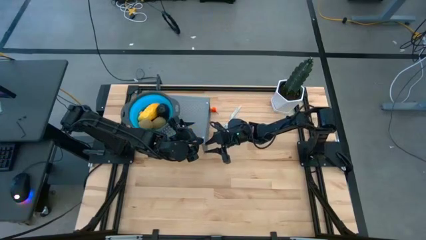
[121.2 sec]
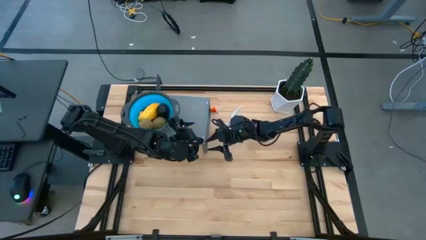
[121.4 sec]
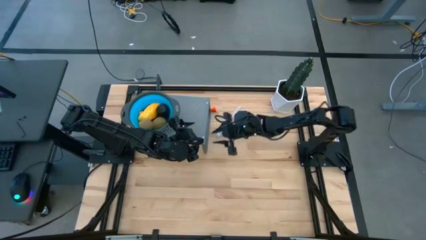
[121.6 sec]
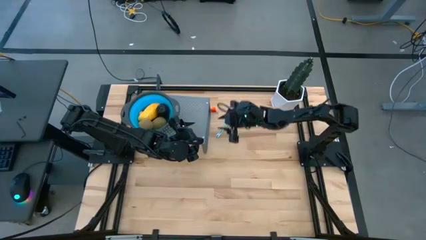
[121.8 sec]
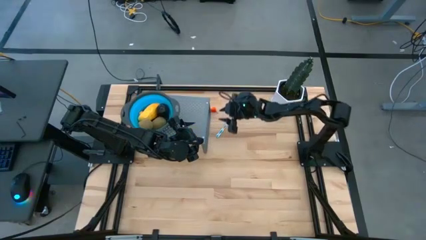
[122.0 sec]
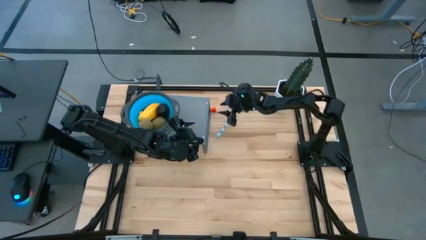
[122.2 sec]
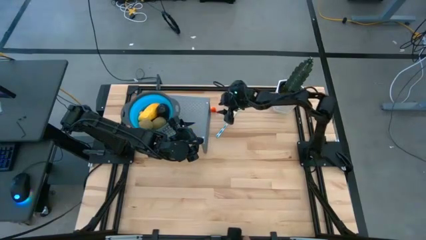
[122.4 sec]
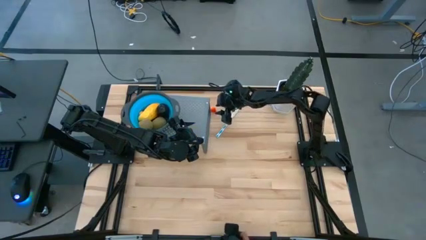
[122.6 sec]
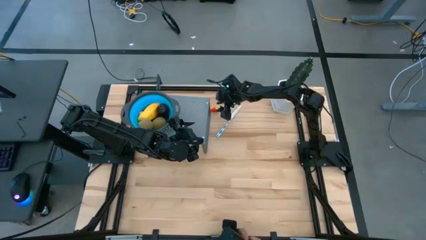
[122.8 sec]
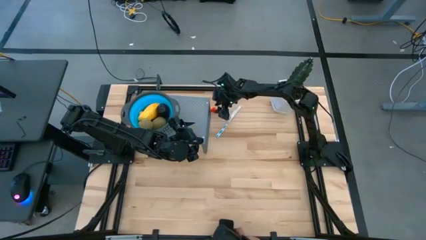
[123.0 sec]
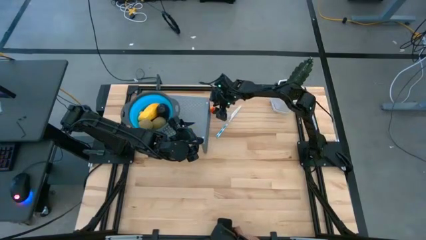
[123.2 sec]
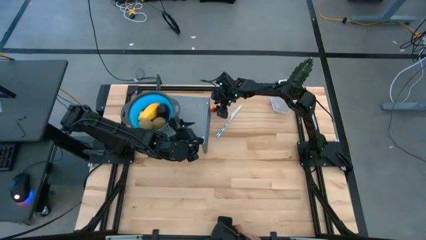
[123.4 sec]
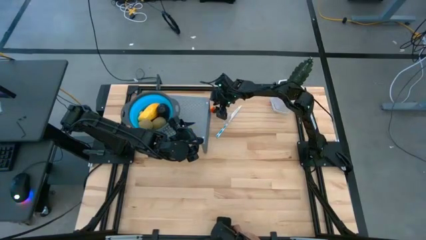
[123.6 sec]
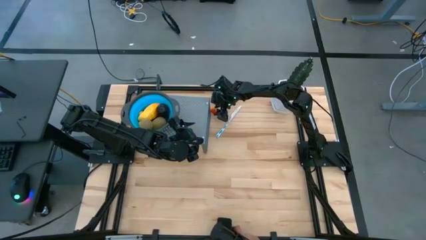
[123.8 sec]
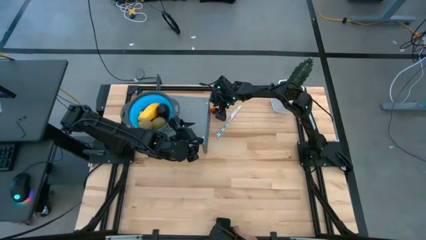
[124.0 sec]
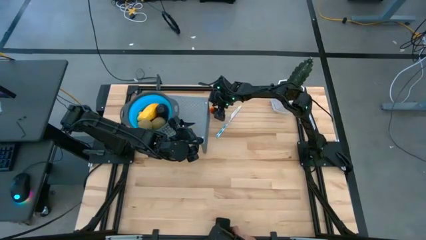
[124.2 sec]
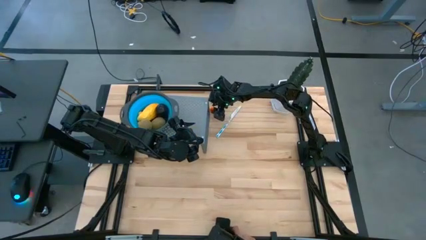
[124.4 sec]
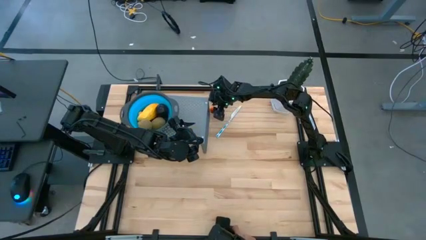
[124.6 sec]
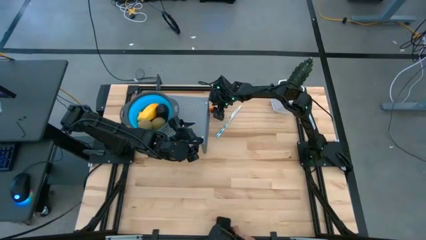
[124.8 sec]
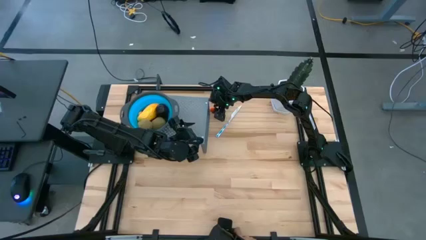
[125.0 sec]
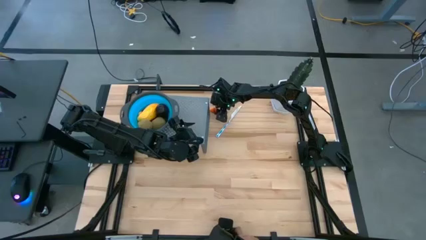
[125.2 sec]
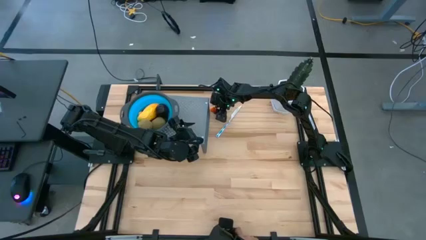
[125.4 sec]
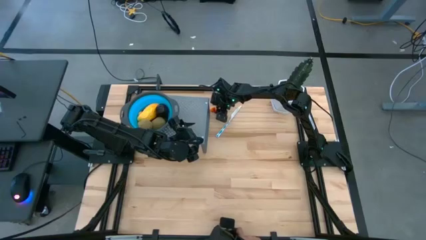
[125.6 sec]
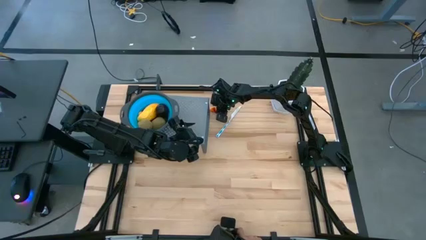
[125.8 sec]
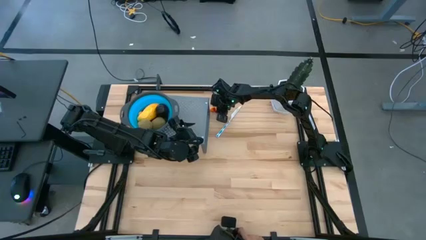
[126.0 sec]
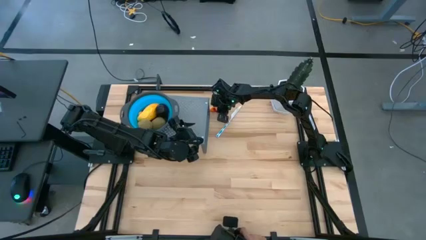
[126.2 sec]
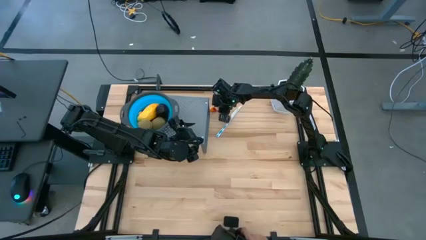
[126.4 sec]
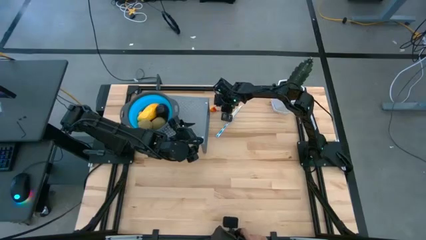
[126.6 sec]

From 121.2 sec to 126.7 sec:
Task: Pick & Place Fruit
Put the orange pear into the blue strainer bowl

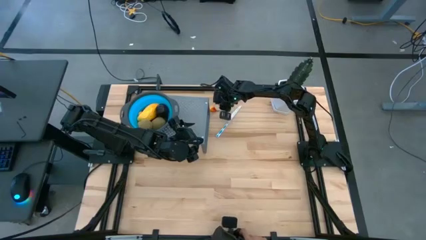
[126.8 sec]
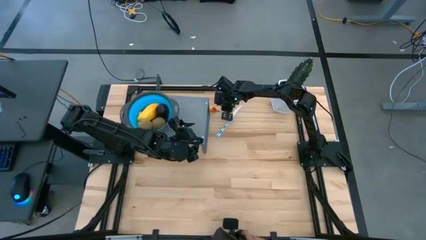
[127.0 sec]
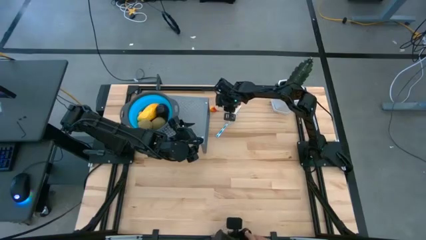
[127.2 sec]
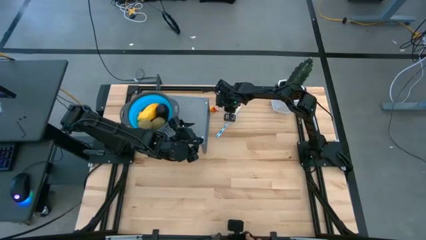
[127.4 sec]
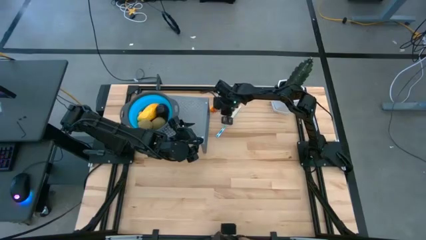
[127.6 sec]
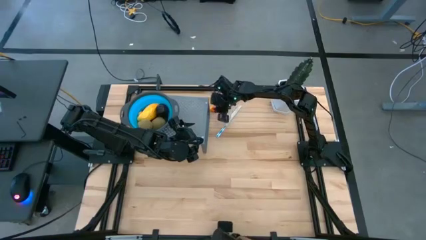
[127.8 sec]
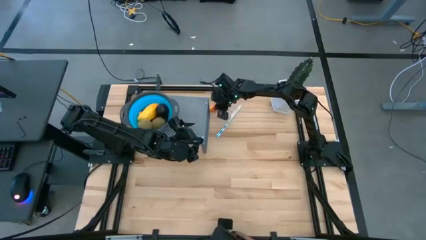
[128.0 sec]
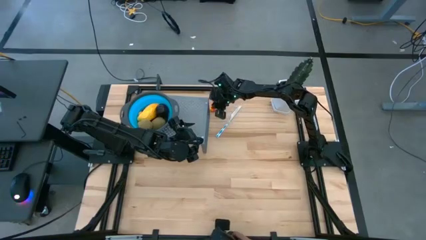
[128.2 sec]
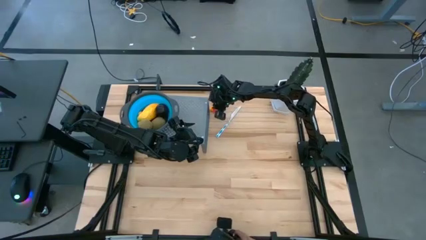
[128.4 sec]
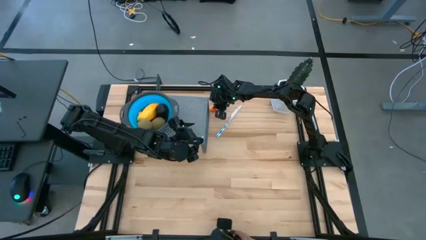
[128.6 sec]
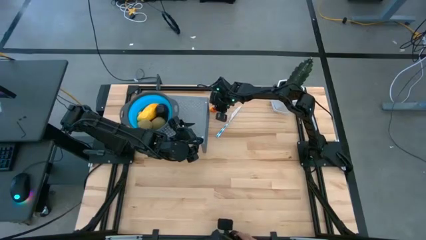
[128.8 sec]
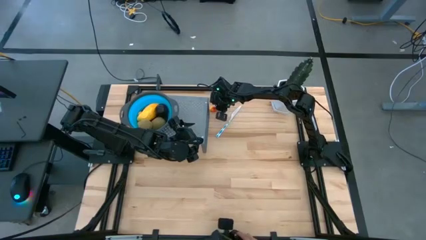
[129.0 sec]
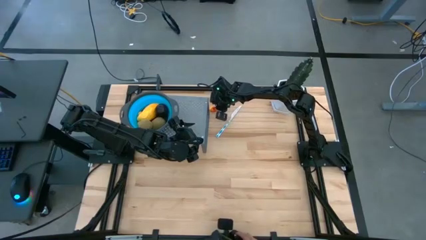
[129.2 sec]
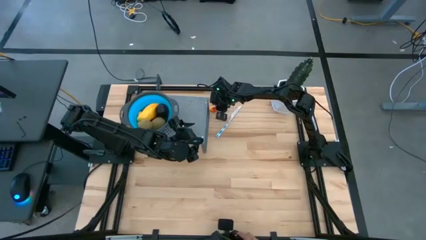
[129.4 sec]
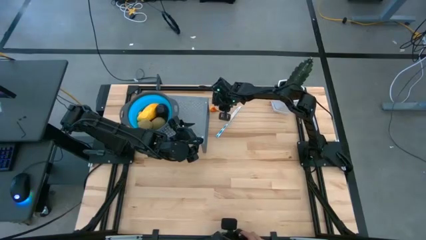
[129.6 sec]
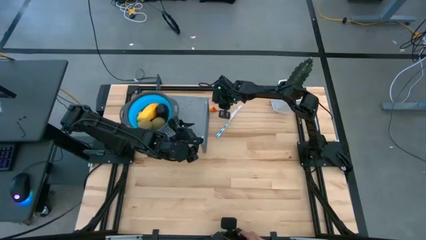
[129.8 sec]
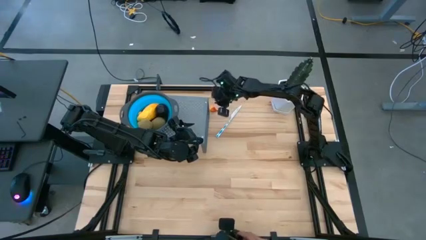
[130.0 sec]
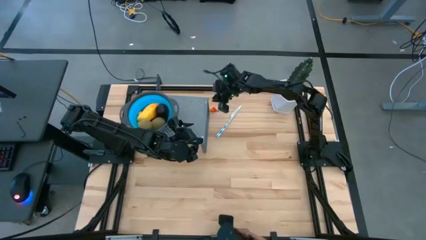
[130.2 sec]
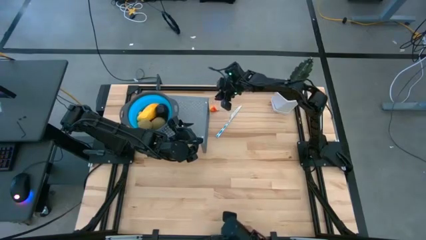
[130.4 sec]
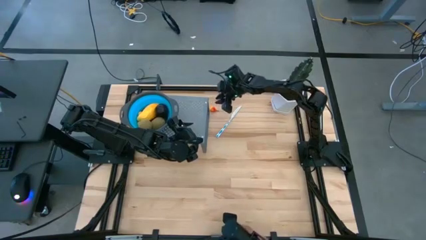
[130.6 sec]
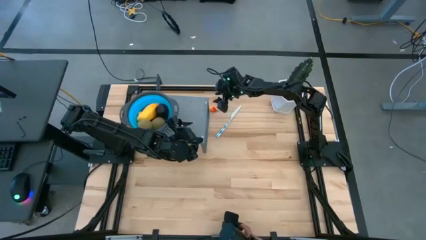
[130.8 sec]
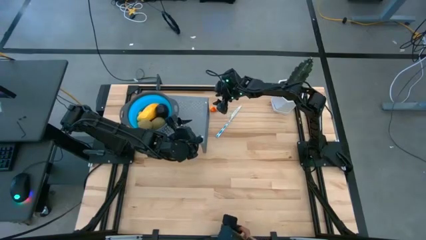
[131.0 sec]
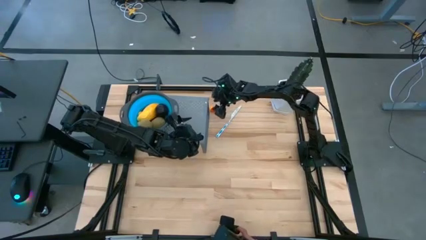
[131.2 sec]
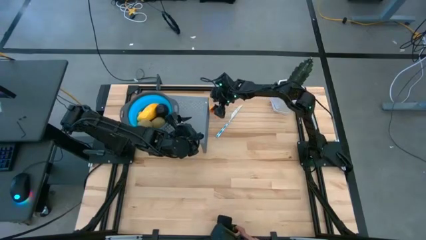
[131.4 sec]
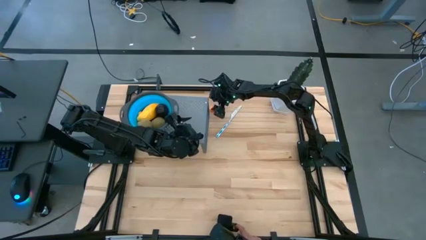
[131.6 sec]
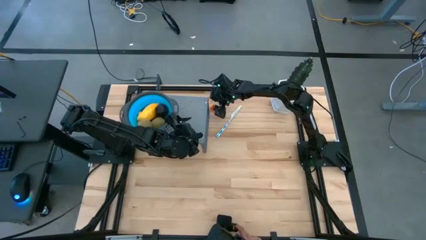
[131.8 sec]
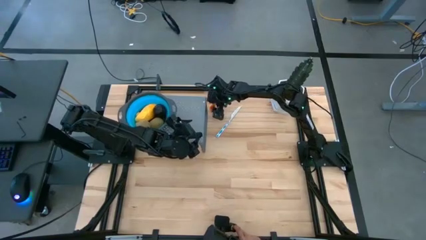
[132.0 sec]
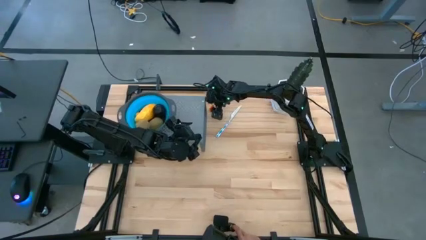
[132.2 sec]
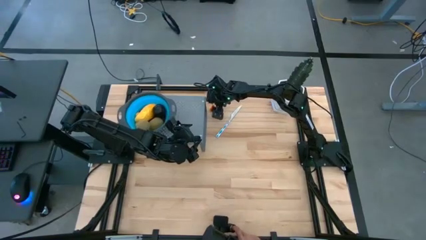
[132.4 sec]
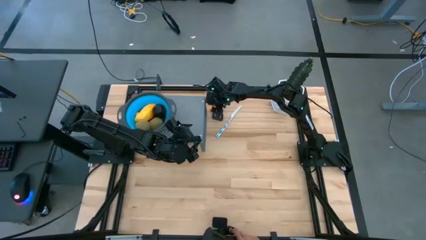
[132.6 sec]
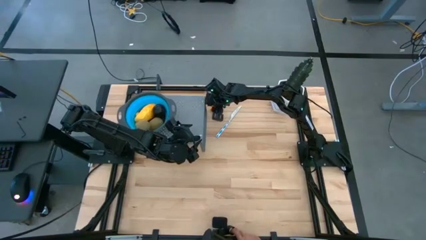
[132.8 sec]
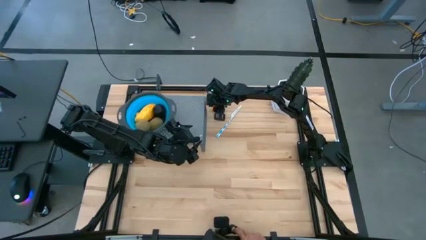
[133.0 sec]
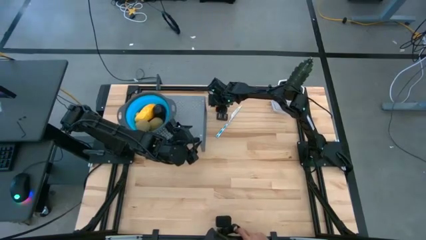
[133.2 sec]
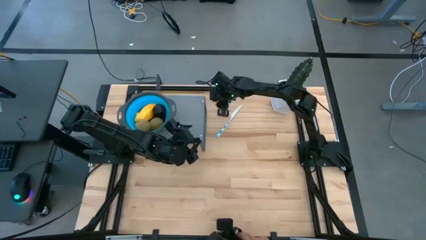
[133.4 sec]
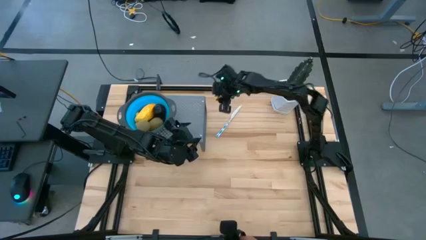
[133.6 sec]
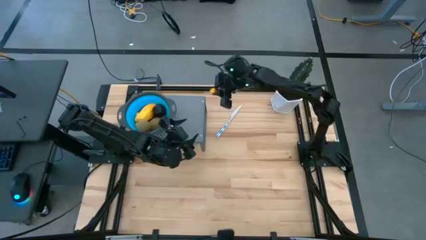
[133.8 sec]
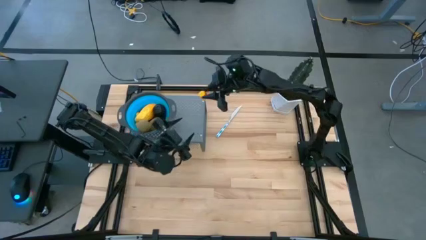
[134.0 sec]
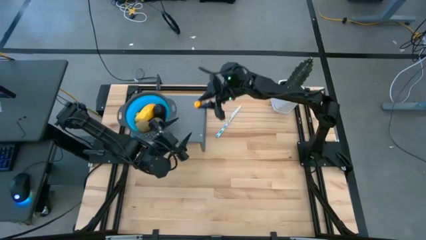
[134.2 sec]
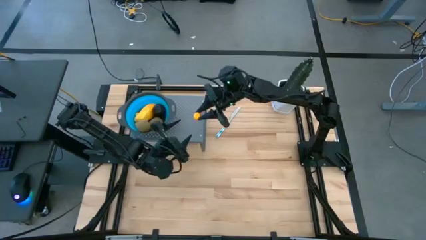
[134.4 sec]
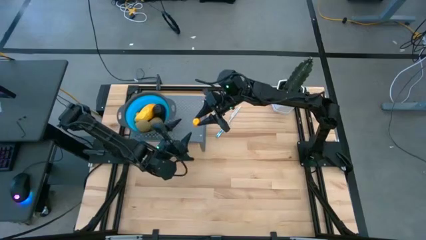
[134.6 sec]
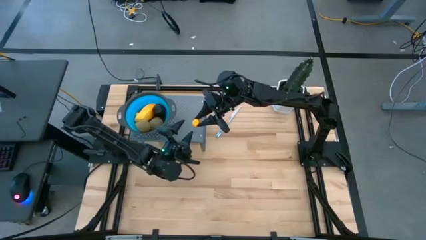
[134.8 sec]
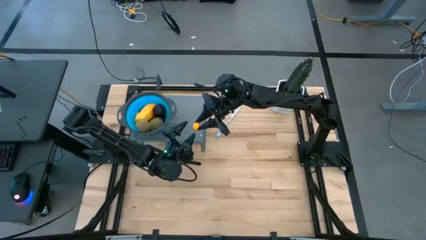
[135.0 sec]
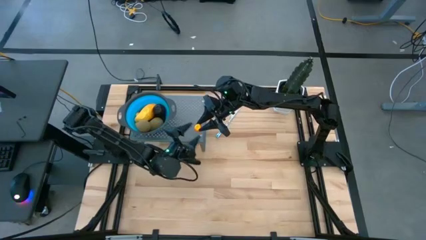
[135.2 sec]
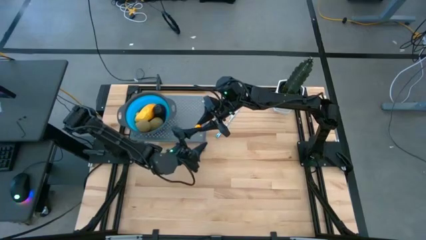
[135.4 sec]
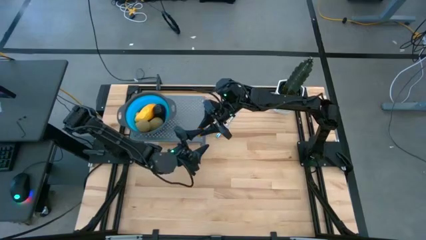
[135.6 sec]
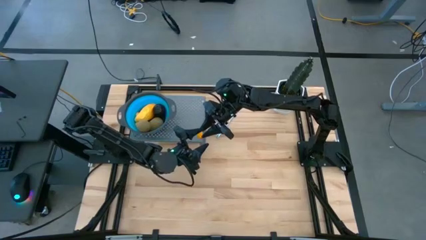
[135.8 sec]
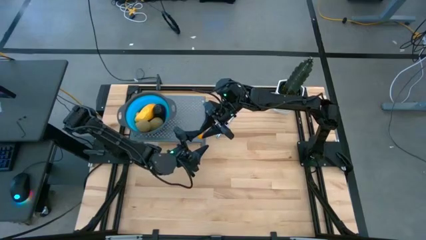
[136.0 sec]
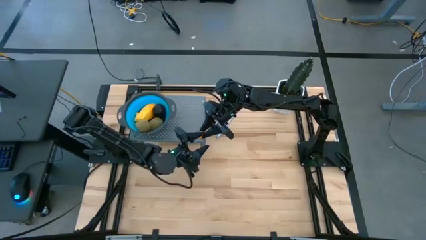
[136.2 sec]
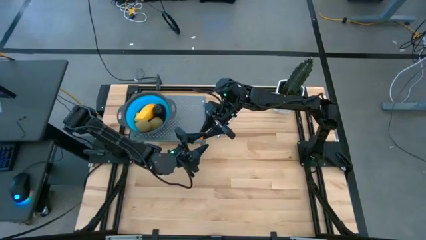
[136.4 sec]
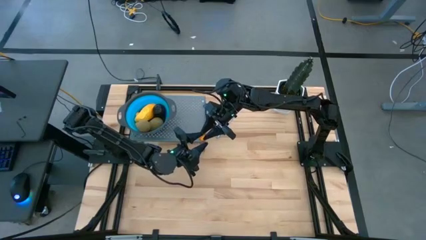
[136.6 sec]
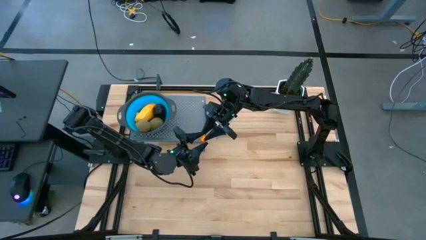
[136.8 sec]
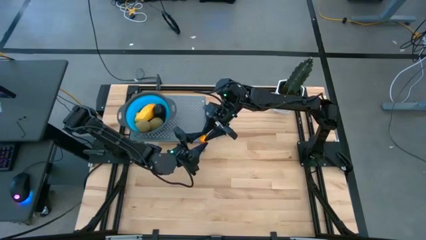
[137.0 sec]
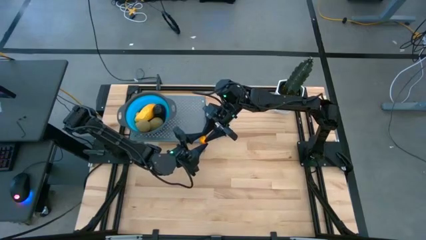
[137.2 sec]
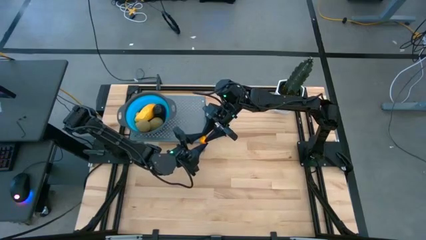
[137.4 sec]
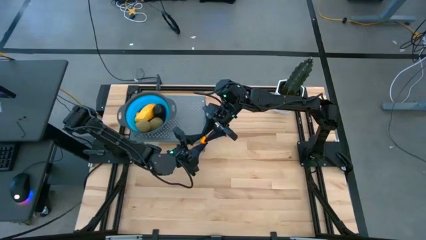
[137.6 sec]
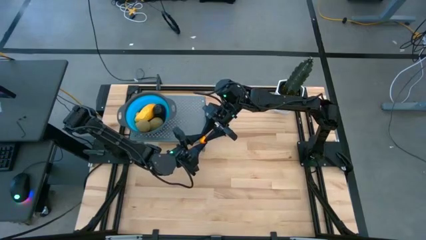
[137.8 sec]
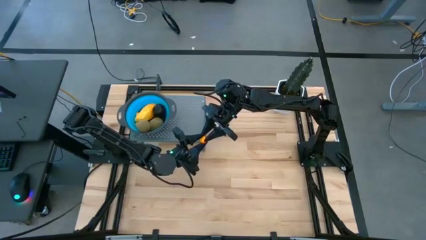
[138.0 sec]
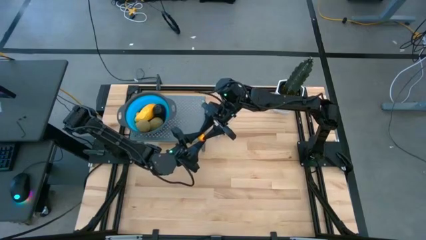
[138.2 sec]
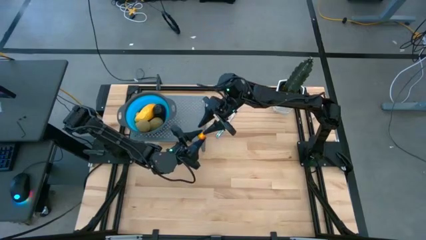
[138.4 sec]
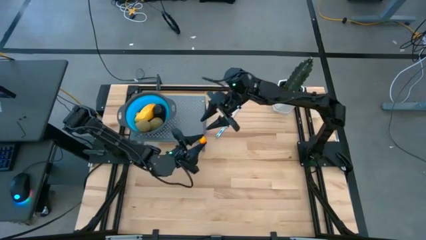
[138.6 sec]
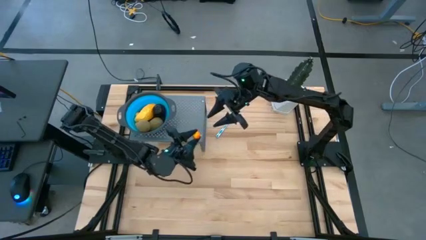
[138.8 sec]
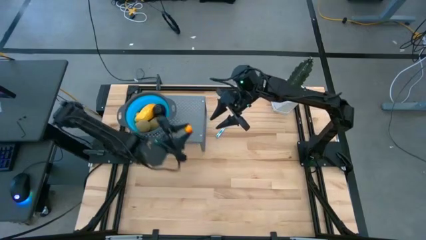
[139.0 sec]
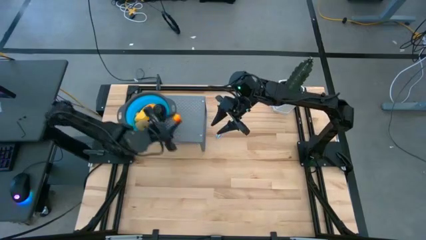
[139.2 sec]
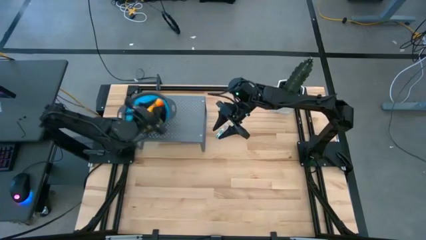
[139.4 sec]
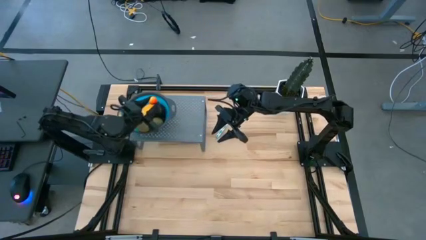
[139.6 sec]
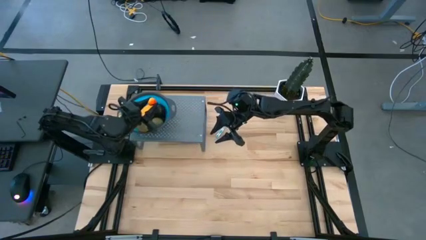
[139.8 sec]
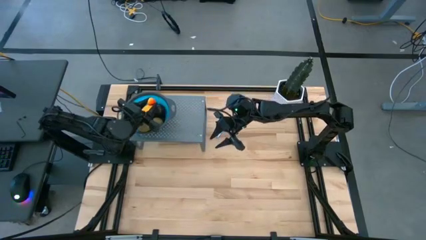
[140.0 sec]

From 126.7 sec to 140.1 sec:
Put the orange pear into the blue strainer bowl
